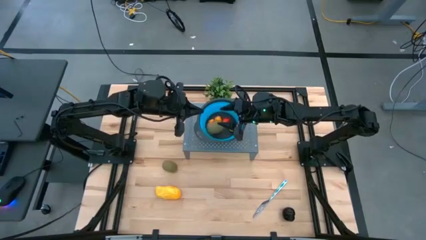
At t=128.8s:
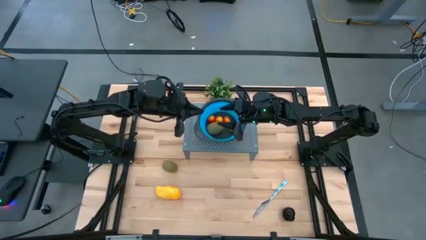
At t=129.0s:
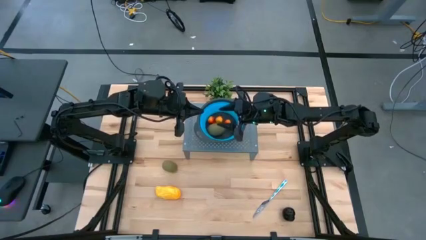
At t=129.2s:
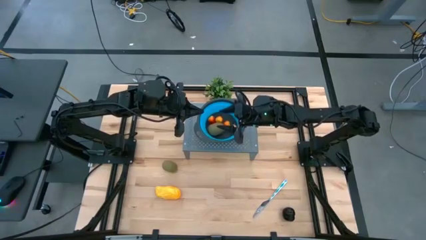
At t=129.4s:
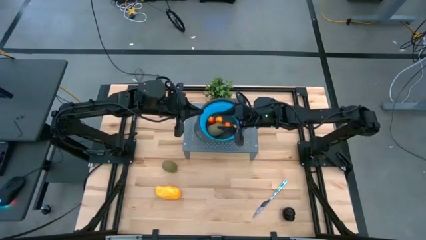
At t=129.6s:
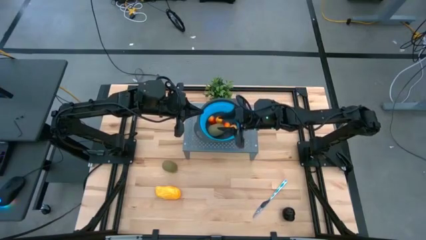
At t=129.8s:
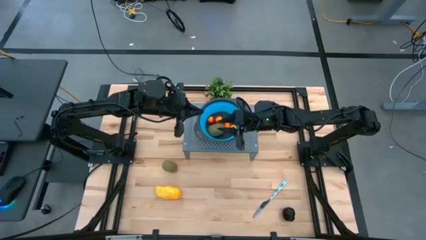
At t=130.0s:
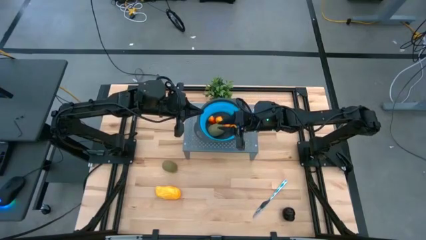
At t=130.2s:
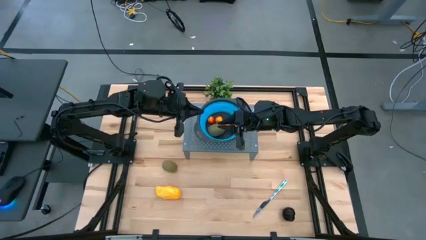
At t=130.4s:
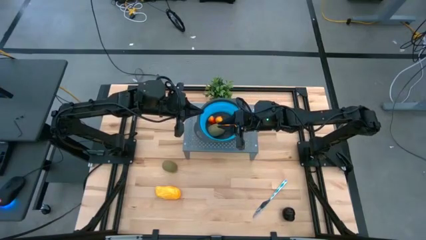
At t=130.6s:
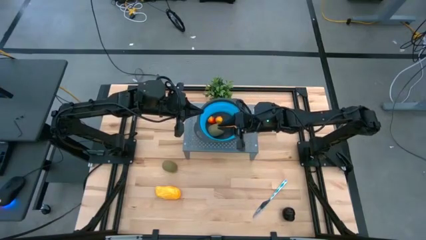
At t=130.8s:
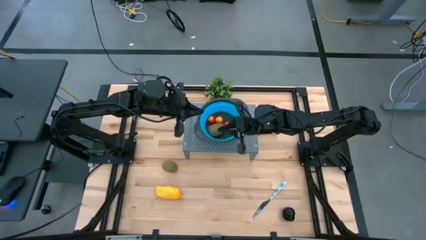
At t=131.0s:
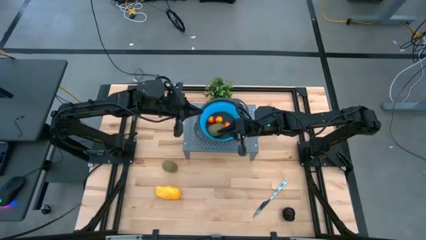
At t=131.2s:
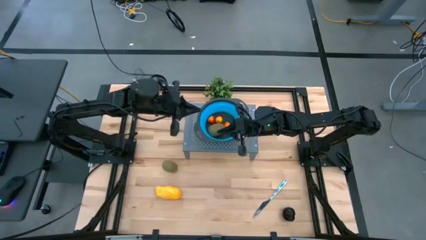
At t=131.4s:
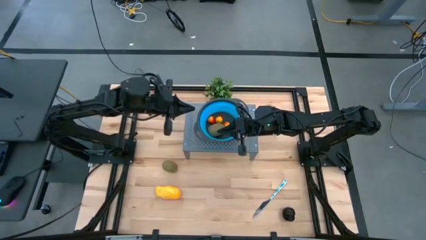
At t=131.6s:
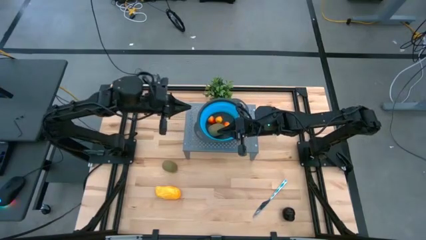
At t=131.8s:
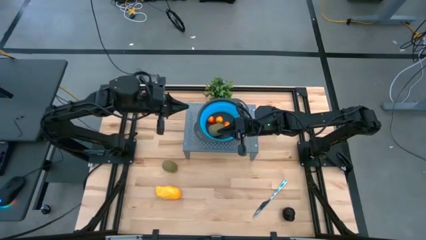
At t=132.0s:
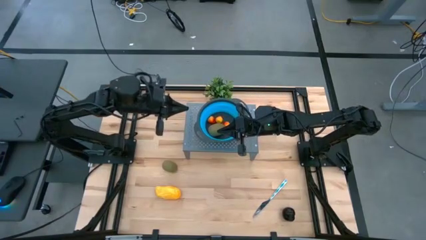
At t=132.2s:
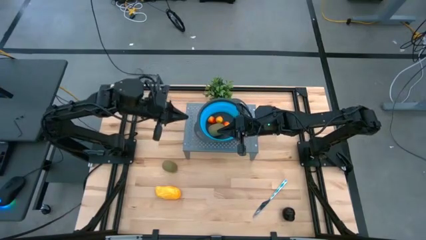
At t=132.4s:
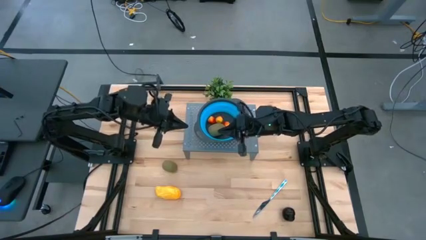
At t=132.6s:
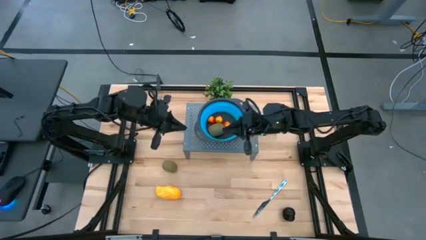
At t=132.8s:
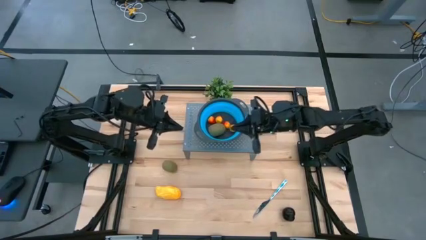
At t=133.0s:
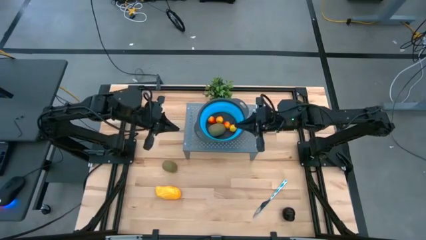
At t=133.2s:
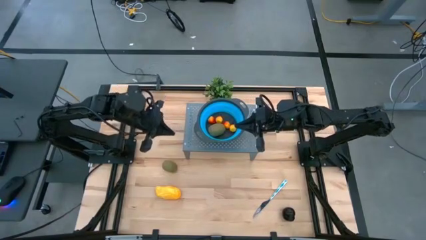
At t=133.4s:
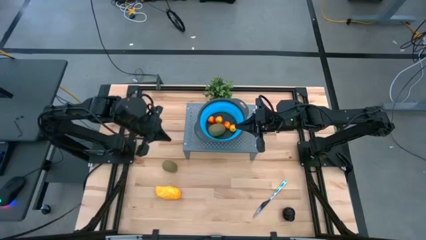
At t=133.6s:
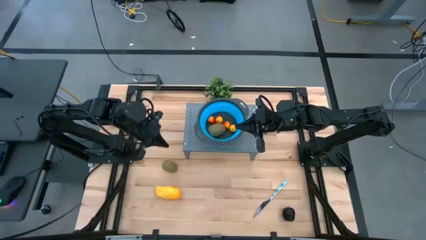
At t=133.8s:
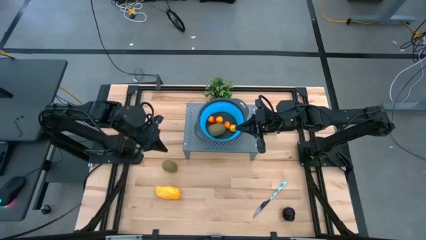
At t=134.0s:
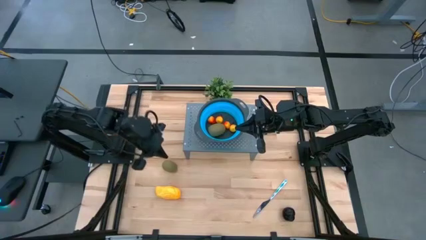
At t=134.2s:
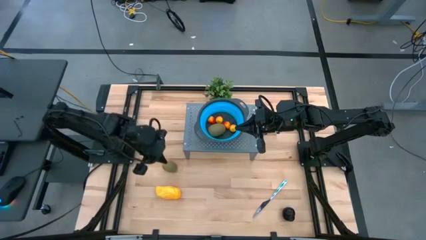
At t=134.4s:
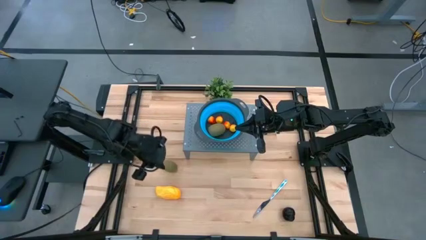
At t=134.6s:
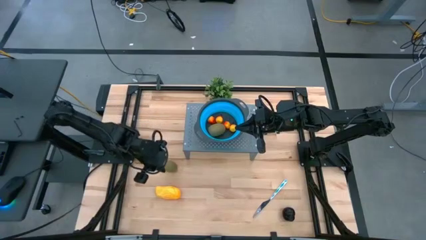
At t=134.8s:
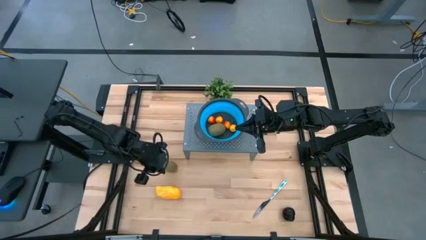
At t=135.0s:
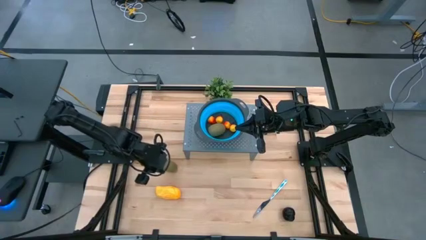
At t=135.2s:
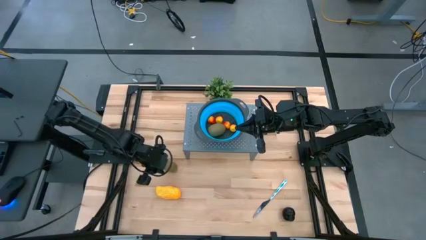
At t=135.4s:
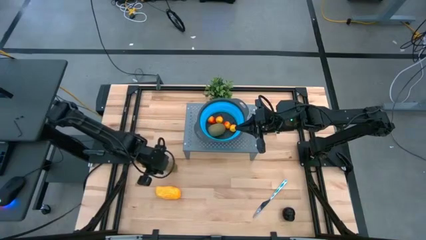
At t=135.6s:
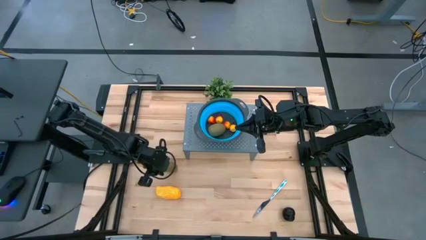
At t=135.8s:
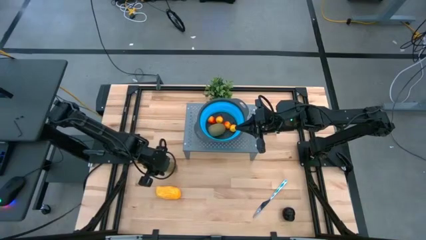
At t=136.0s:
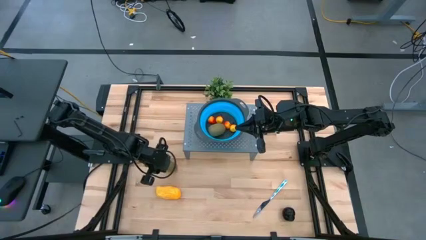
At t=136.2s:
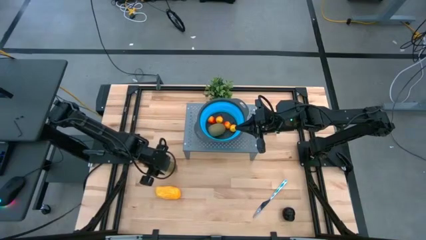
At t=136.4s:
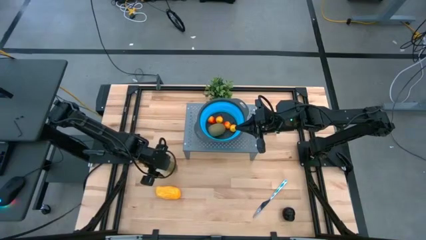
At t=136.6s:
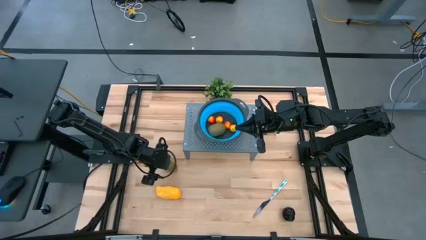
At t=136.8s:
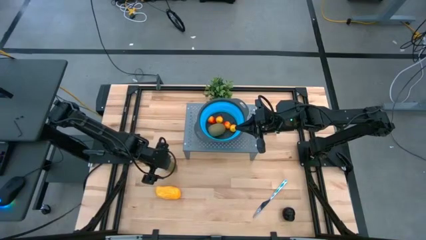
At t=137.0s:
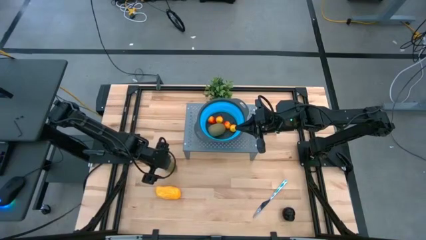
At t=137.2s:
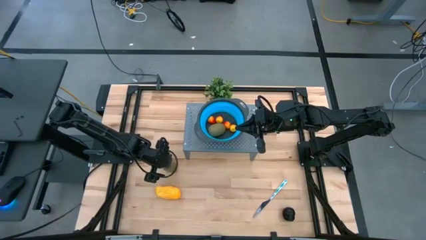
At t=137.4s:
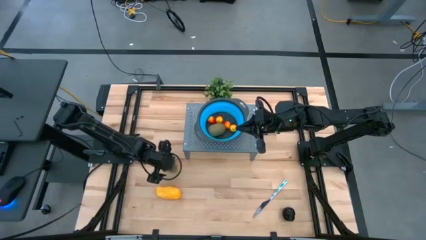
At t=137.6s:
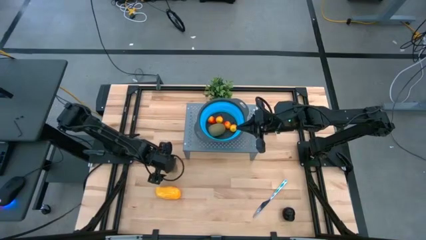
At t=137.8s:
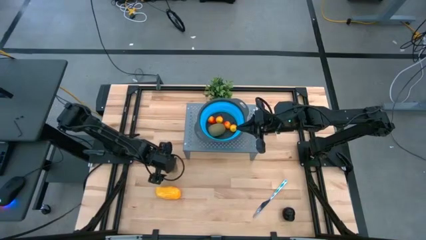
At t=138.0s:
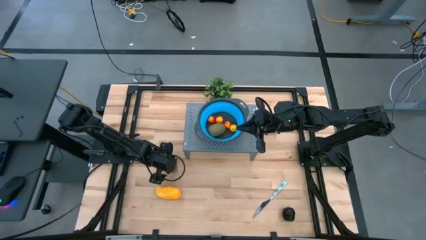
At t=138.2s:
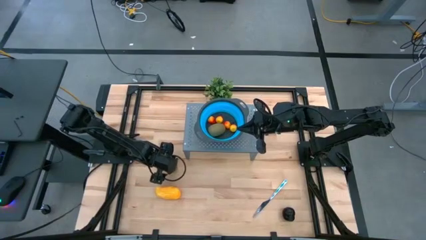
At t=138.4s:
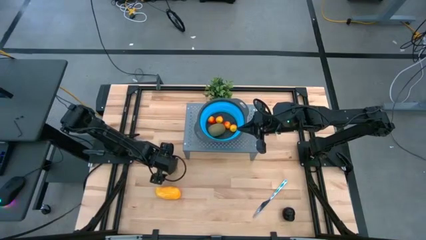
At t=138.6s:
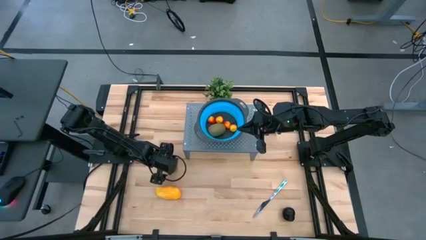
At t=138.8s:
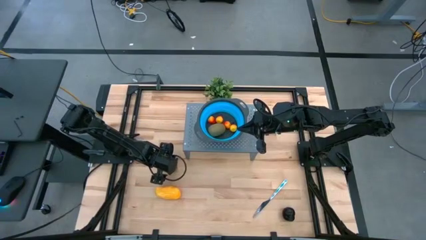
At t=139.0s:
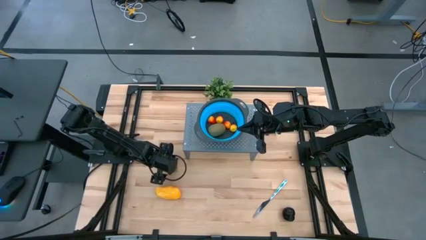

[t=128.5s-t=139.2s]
Task: Pick & Place Fruit
Put the green kiwi into the strainer bowl on the shelf

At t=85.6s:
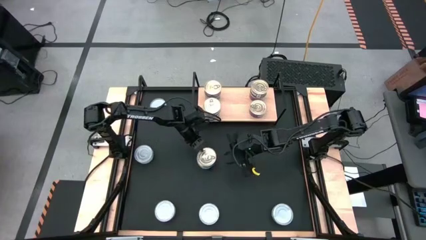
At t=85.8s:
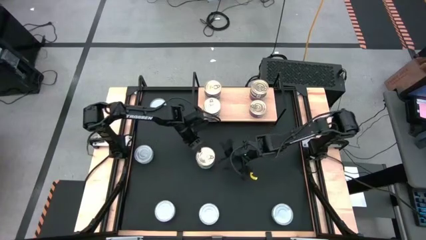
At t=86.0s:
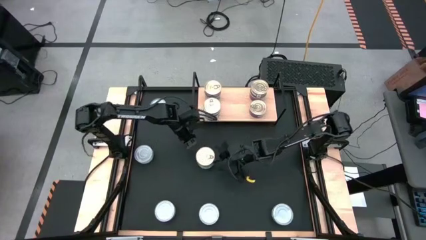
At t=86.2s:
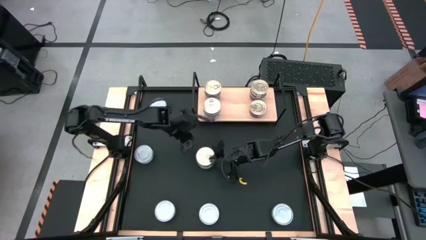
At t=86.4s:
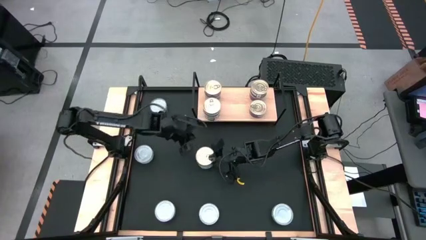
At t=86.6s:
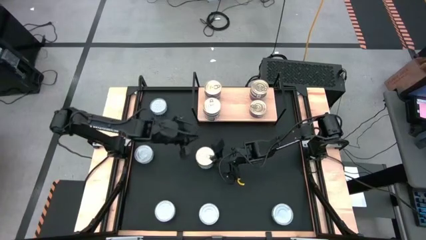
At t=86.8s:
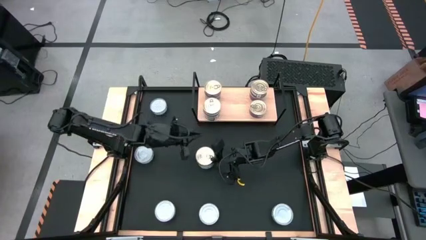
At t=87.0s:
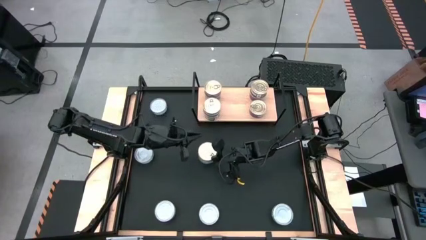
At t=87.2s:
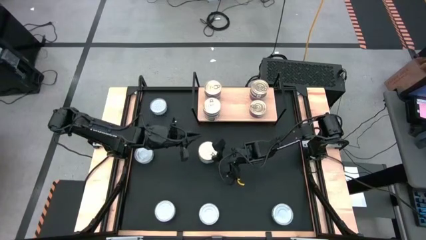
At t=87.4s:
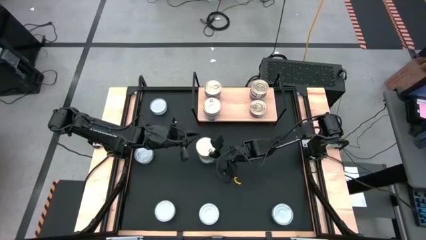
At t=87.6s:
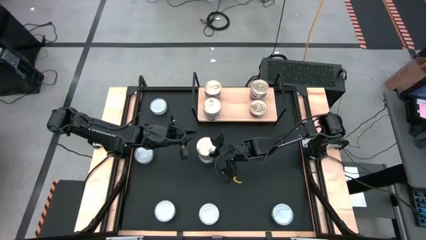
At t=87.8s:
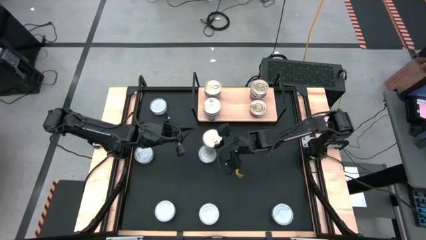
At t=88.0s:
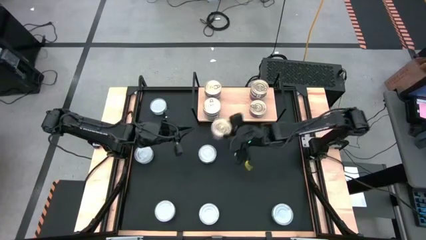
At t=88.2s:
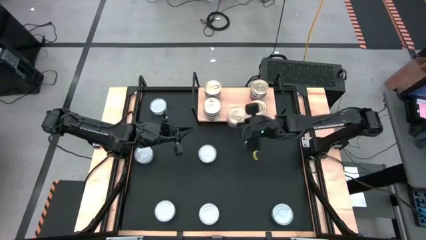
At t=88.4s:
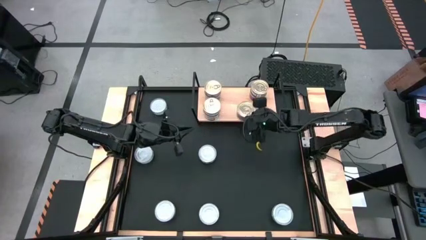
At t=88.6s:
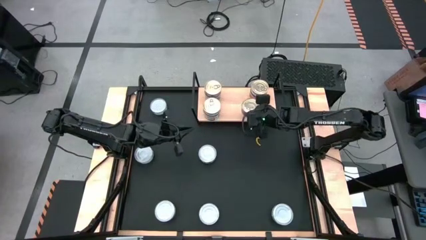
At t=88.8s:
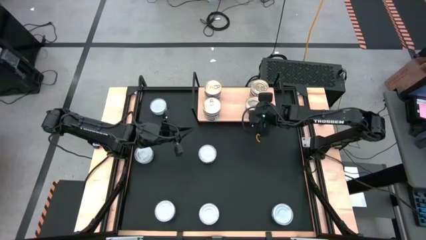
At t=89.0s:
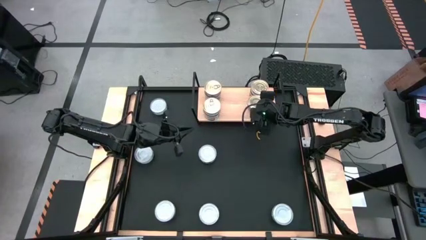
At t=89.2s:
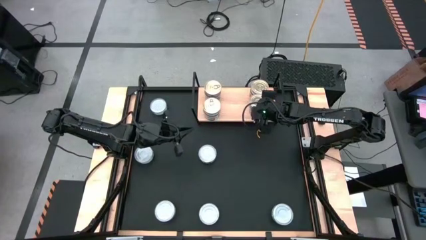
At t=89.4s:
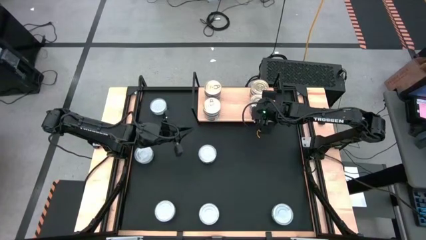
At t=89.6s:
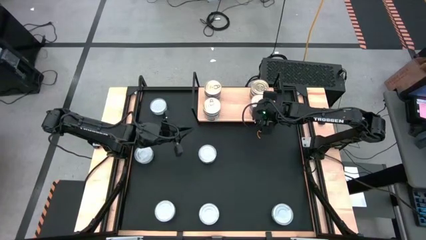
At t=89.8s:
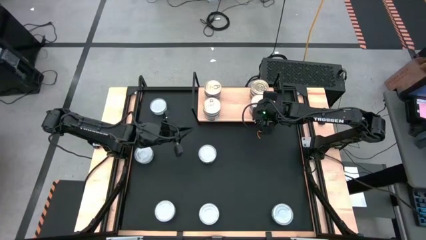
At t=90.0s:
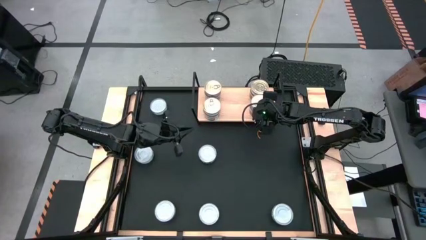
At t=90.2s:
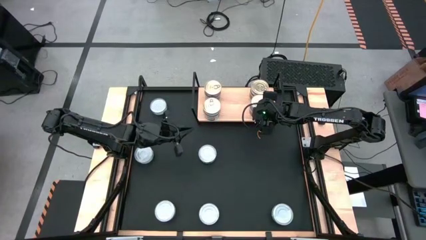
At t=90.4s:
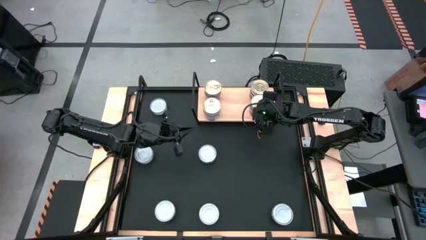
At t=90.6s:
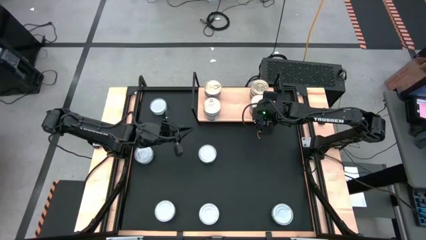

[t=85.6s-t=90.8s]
Task: Stack canned seafood by type on shelf
Stack the blue pink tuna can on top of the other blue pink tuna can on the shelf

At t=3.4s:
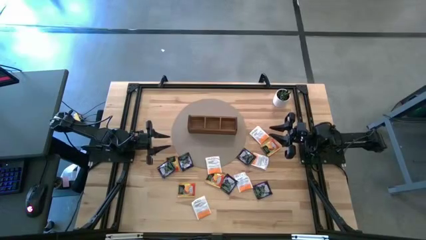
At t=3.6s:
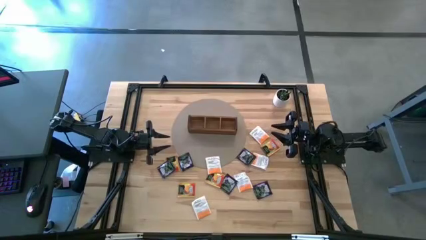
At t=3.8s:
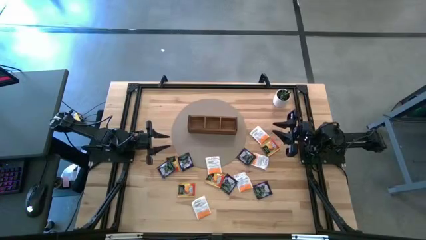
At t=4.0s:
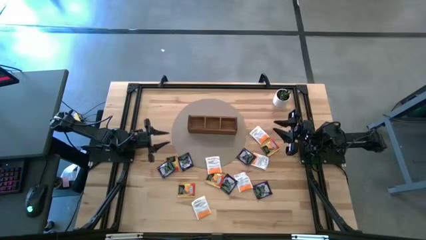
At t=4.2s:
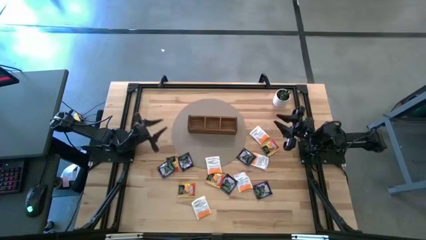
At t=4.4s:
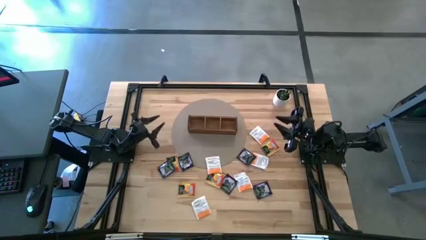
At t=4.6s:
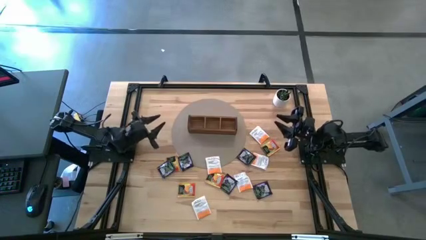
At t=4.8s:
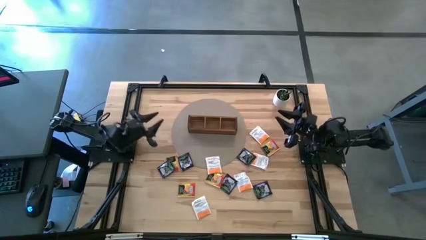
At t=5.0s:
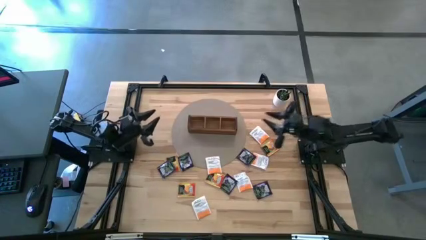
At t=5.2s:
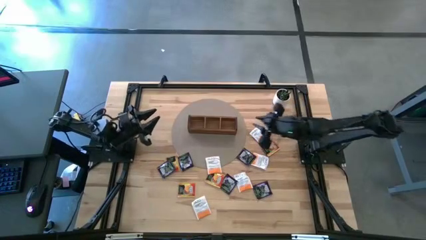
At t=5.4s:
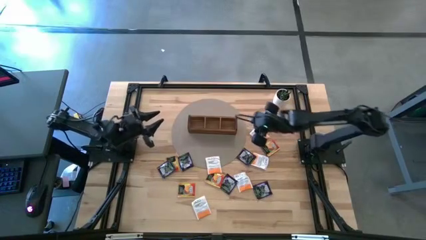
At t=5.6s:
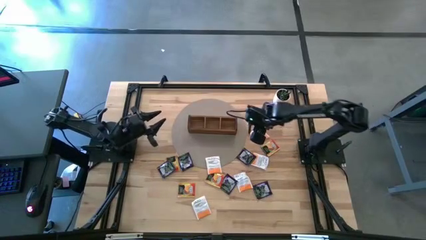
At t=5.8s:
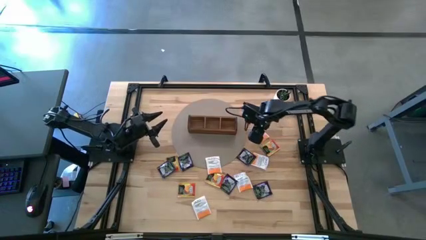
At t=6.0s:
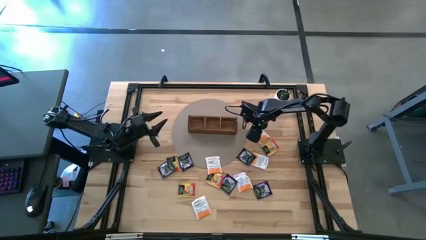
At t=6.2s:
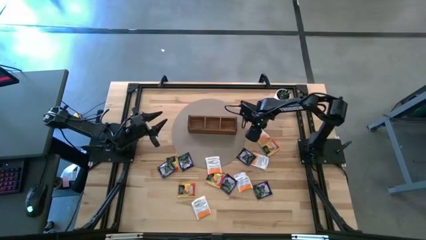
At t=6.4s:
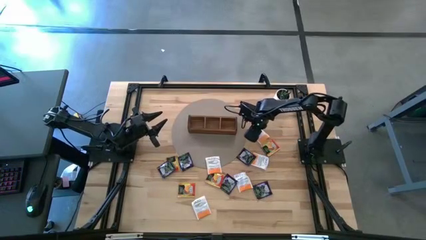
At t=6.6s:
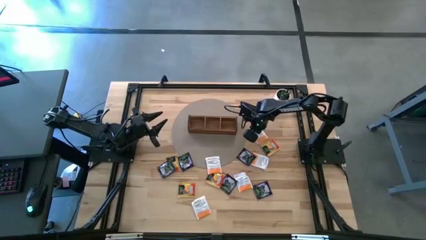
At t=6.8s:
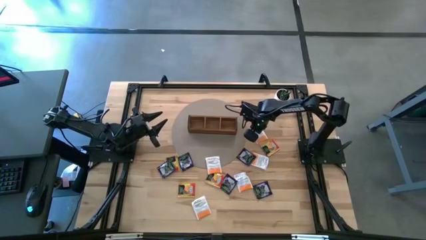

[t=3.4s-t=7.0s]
Task: Pick & Place Tea
Put the white tea bag into the middle section of the wooden organizer
